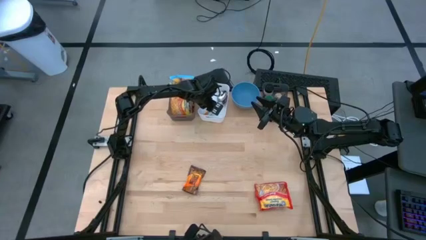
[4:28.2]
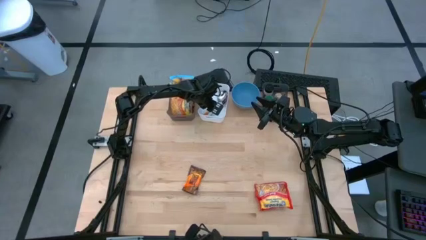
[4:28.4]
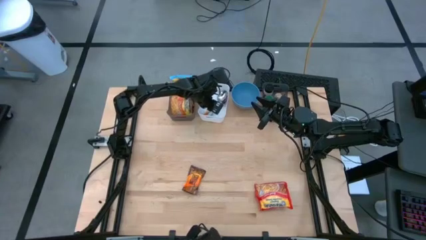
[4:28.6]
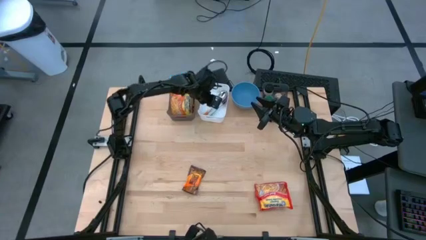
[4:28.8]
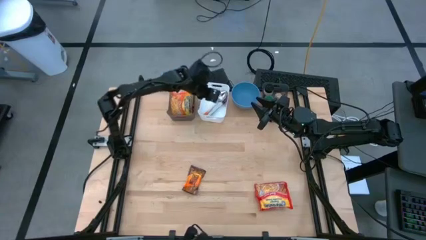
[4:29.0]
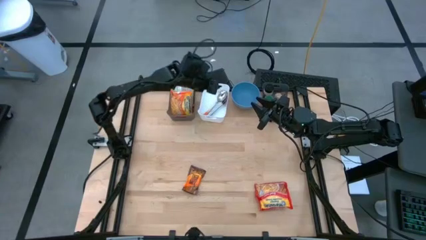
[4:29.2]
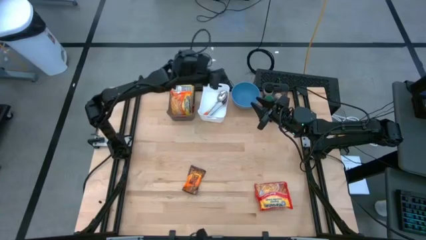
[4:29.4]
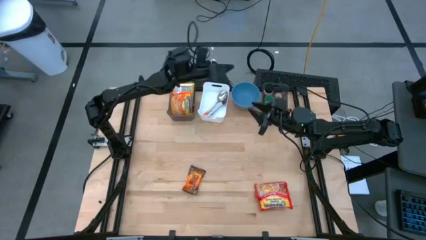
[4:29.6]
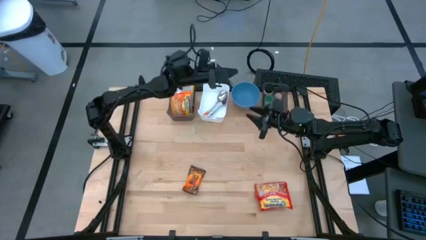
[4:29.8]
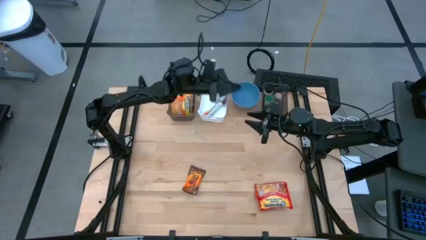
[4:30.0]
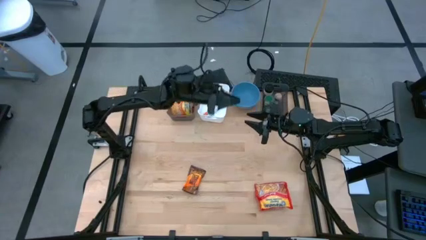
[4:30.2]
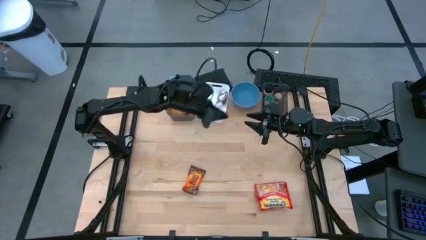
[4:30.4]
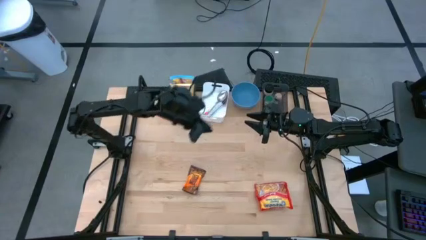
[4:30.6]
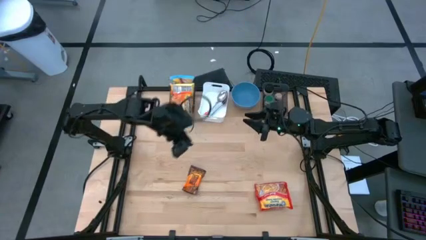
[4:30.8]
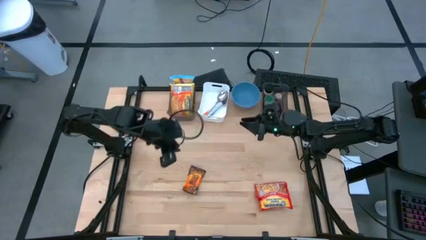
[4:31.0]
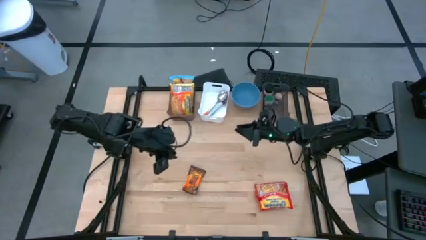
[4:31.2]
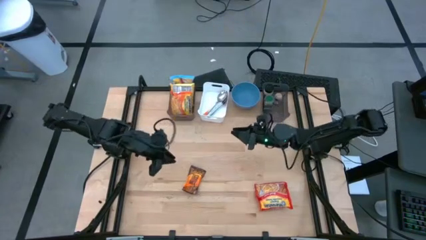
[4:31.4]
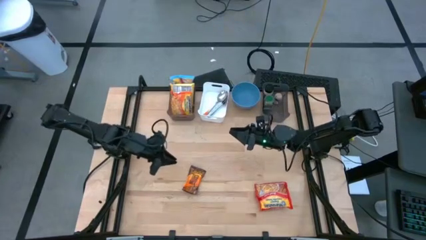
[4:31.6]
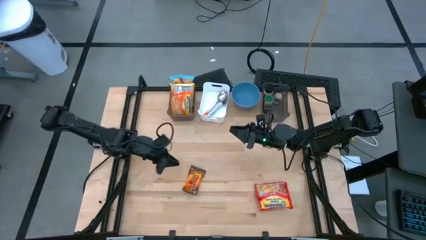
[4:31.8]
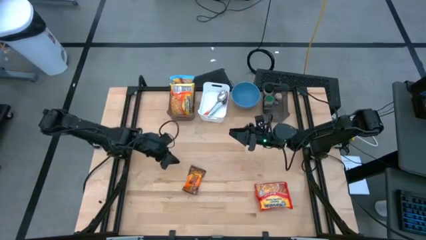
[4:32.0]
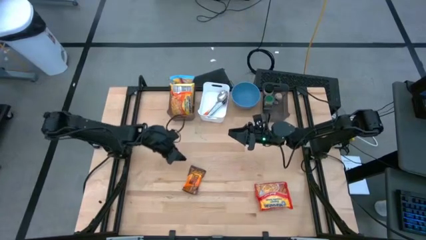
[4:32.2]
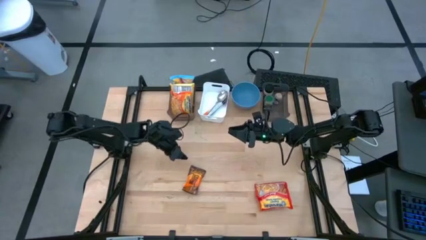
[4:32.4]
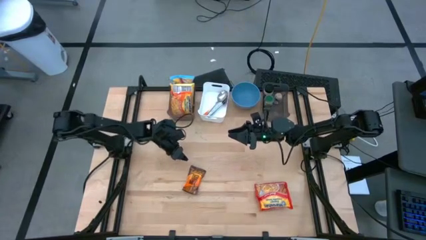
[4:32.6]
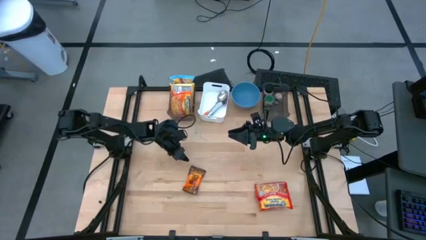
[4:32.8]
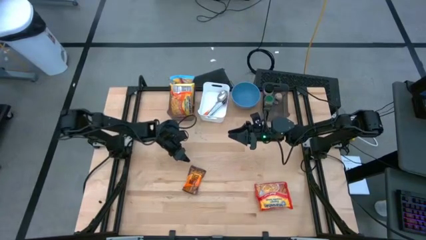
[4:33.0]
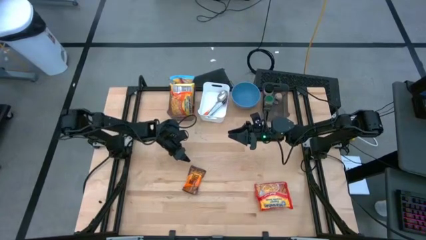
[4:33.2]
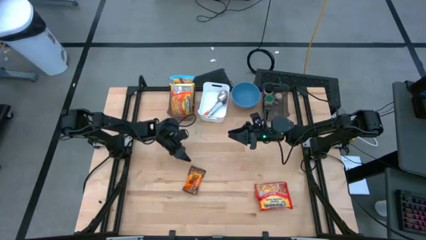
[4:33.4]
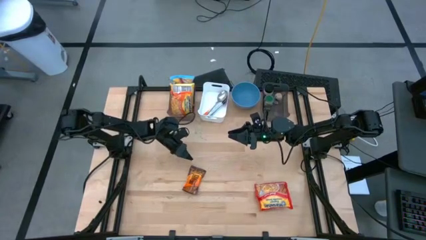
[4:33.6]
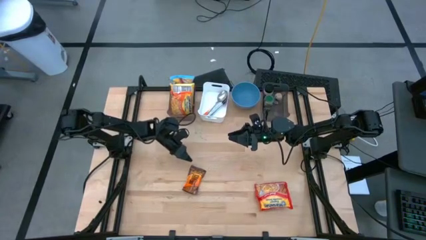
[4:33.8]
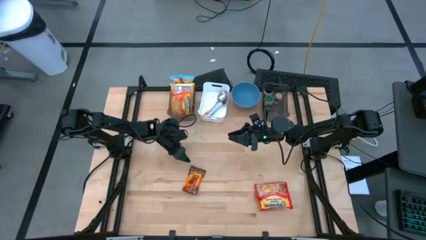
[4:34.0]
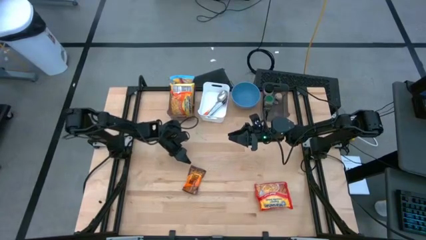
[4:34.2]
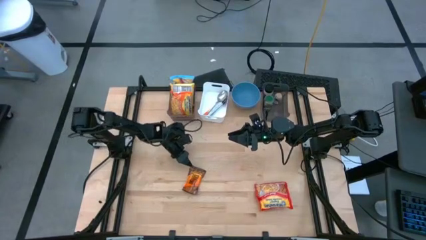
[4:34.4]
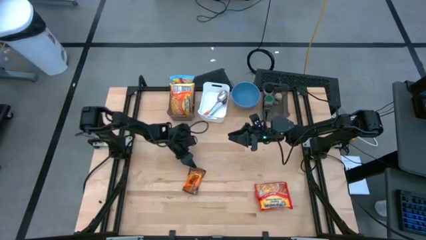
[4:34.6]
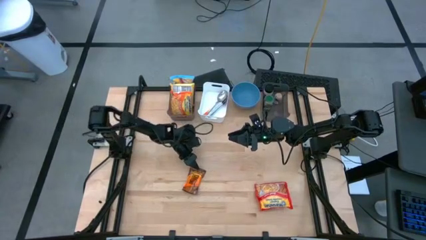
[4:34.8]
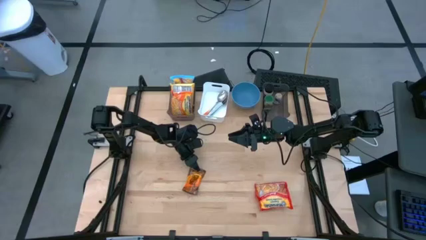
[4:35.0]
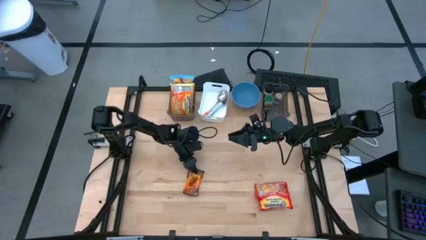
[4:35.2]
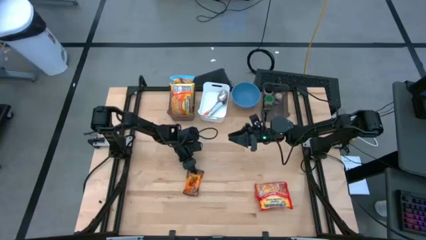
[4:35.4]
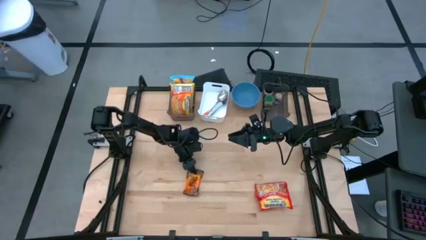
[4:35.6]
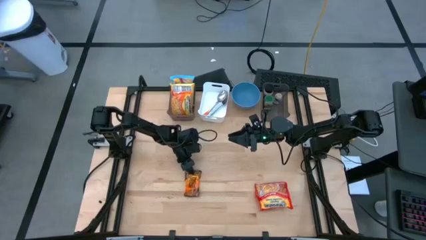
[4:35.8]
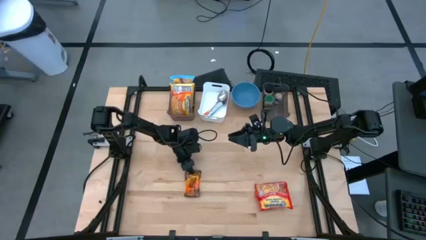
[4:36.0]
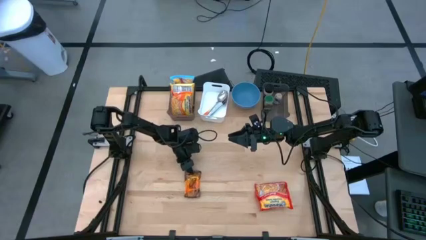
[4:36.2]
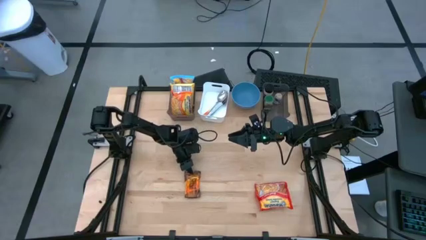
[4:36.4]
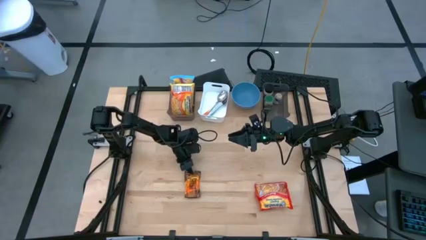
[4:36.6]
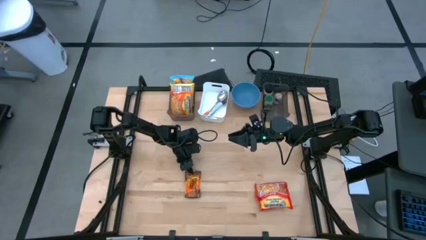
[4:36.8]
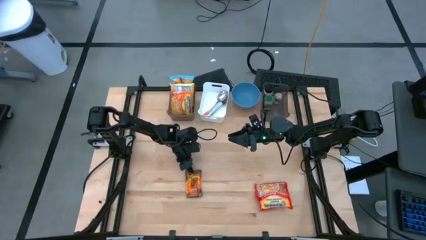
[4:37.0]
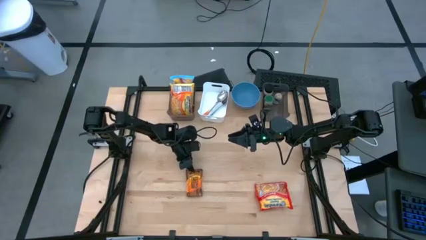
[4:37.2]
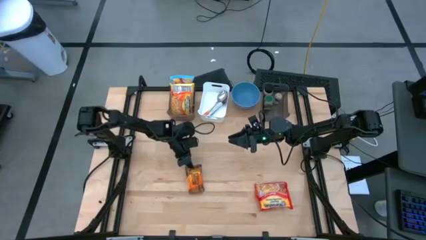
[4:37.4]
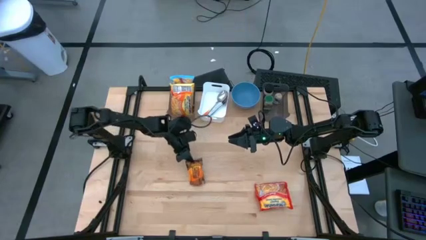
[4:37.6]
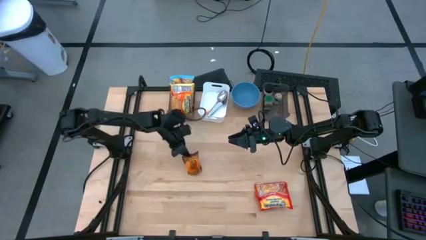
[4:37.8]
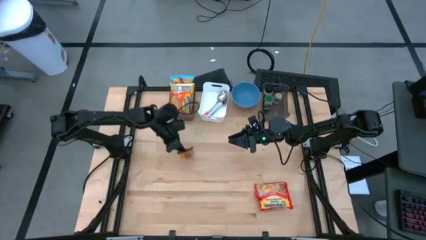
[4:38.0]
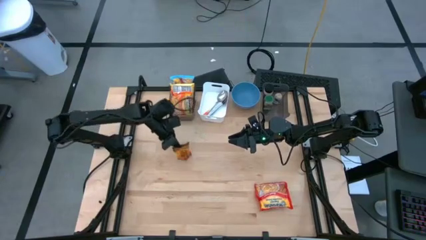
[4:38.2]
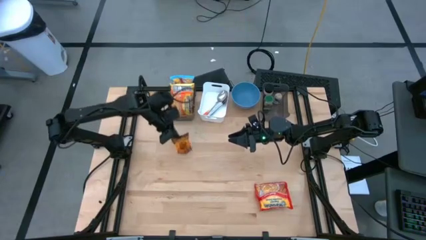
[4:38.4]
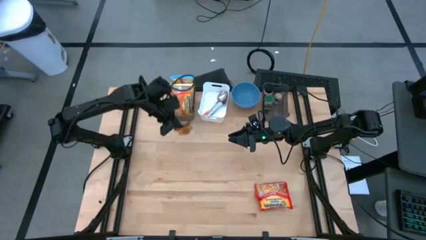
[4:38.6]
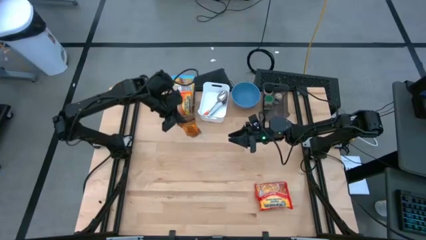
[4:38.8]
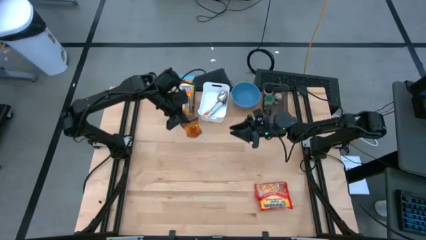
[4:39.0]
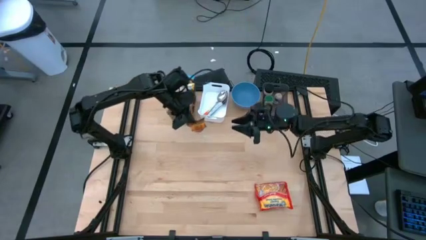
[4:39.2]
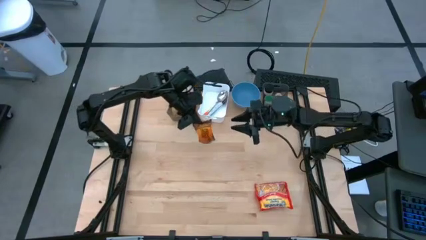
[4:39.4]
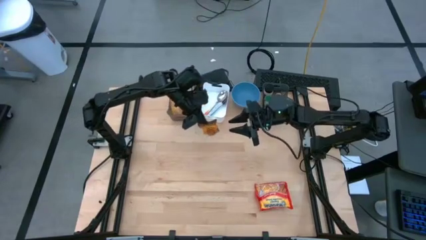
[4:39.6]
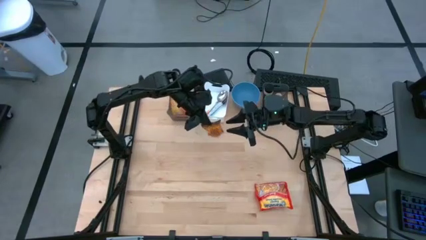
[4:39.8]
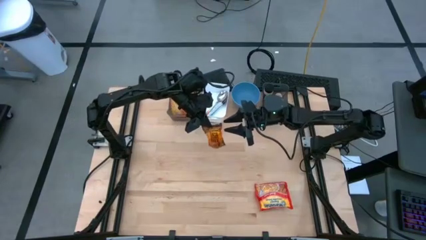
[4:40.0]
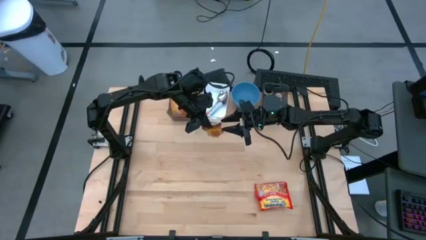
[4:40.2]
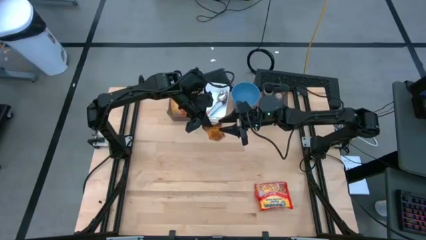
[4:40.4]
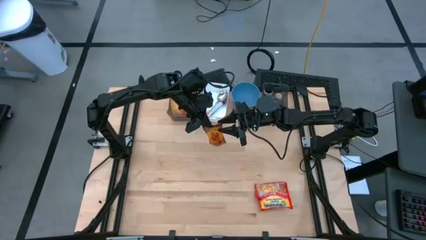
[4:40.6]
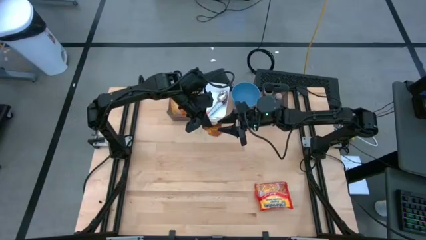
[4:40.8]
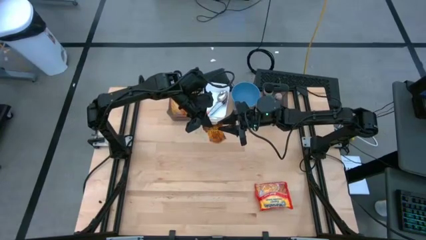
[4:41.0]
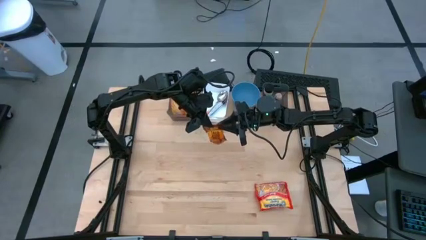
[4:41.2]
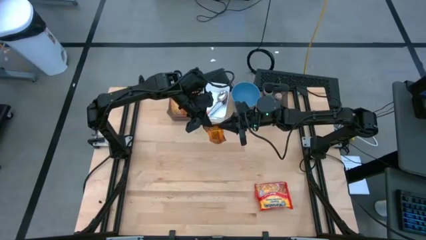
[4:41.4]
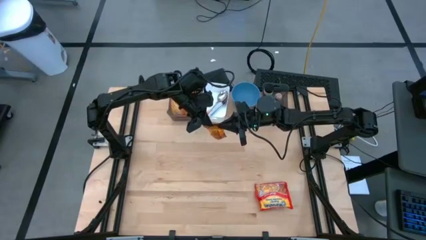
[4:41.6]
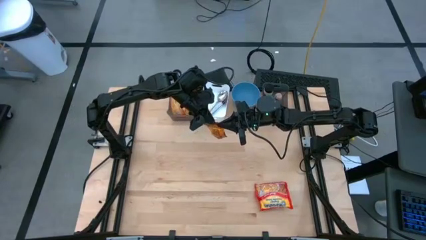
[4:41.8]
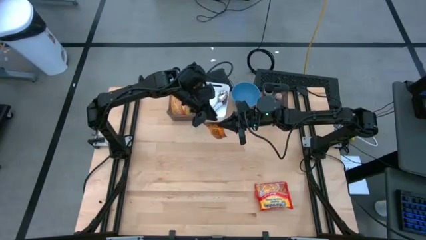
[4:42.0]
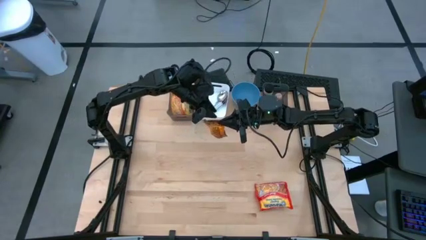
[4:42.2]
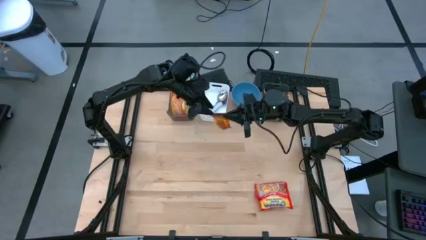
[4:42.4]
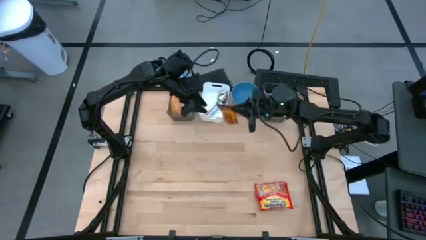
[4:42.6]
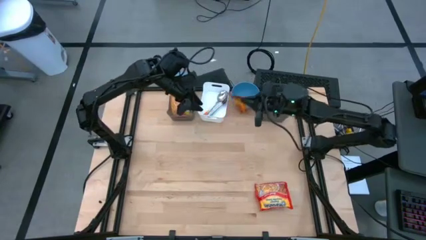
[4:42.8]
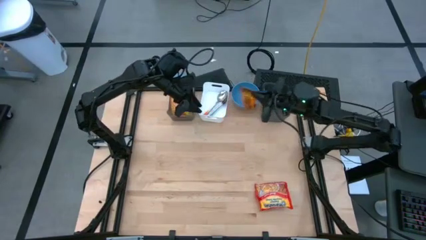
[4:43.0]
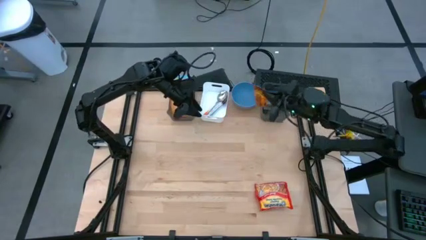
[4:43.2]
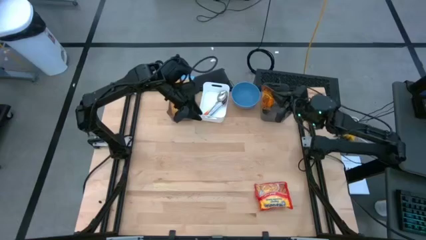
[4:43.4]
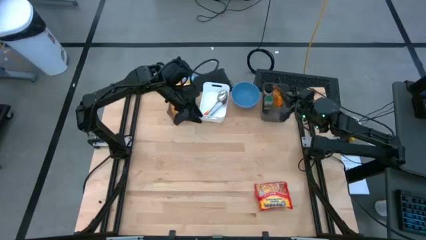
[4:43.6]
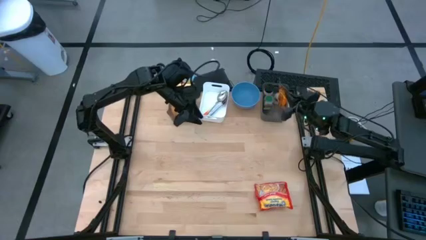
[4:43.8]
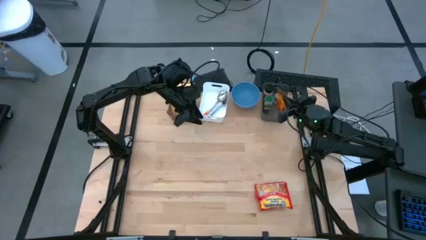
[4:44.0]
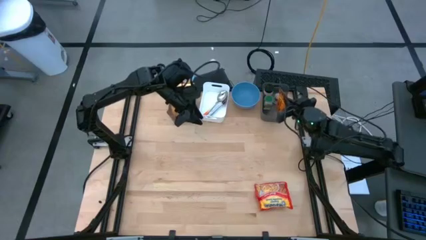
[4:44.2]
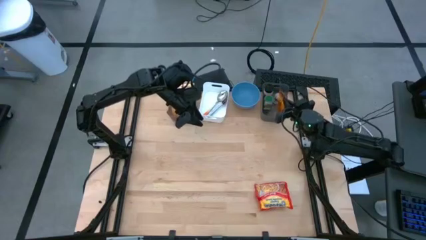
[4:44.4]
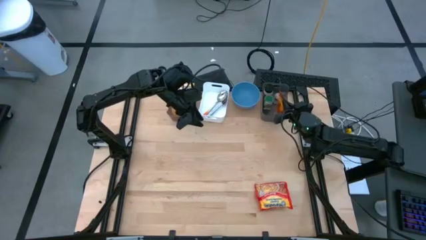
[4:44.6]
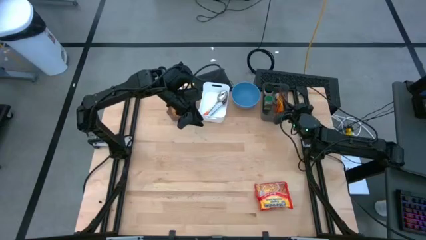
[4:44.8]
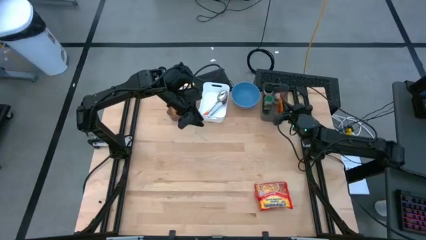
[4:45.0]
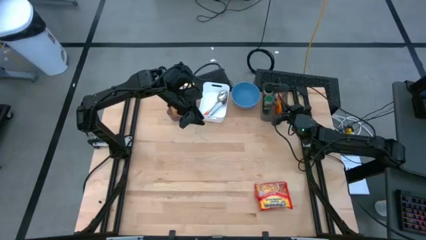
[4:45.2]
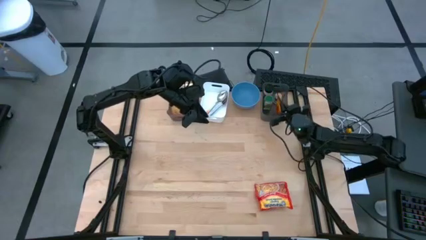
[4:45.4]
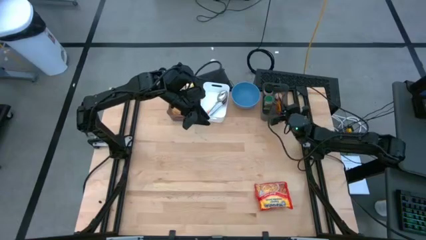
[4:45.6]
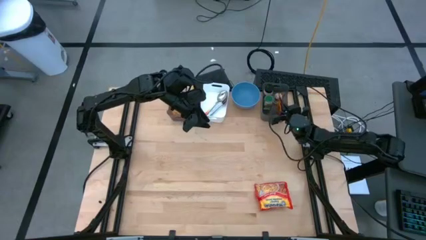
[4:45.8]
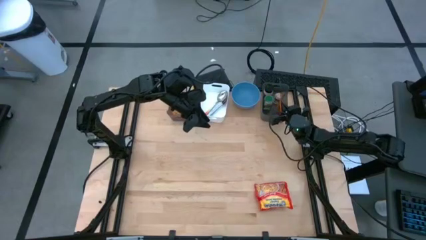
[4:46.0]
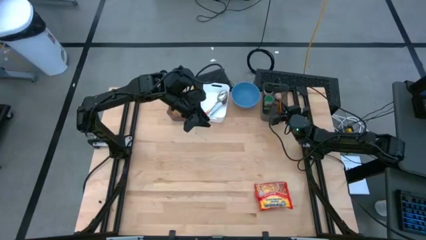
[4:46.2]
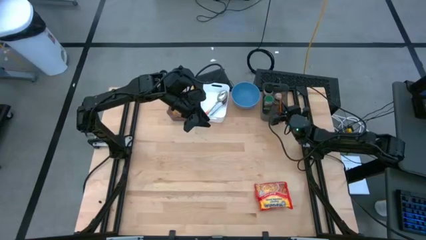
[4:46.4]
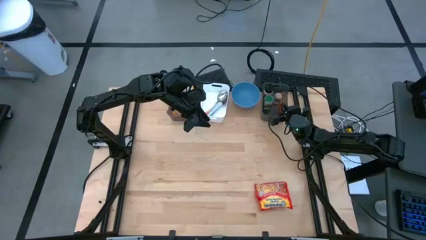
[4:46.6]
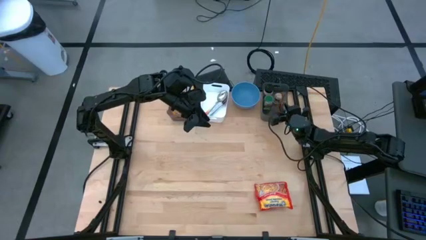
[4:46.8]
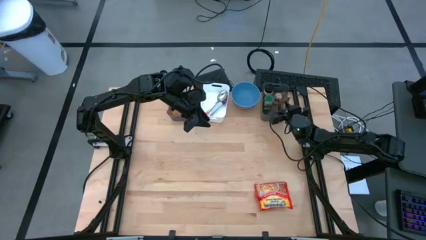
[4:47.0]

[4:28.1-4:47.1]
Task: Pick & Place Food Item
Put the orange spice pack into the right black bin
